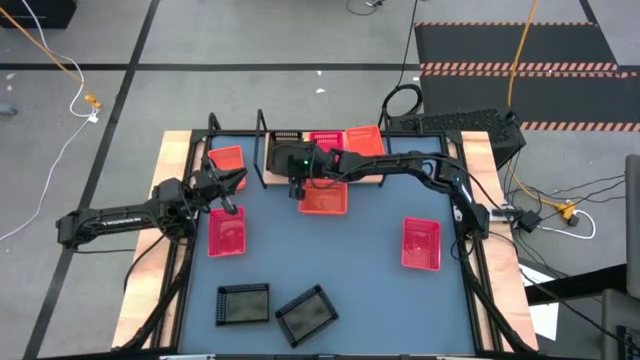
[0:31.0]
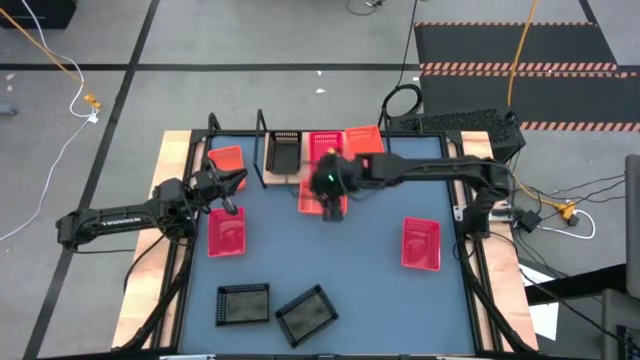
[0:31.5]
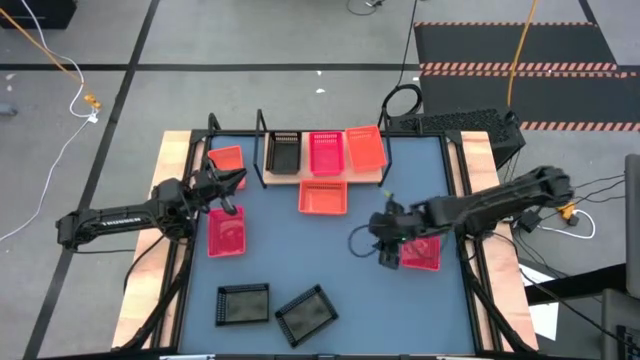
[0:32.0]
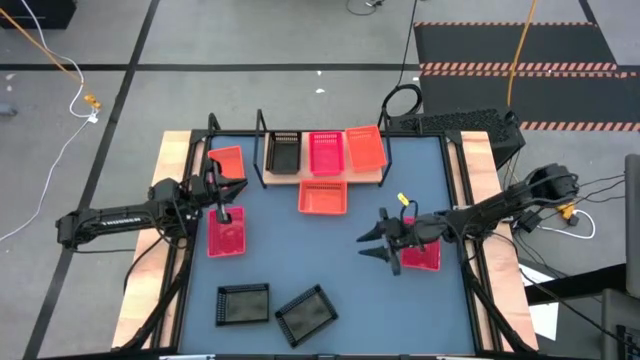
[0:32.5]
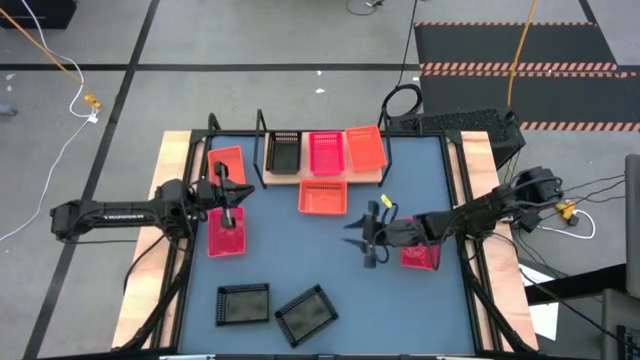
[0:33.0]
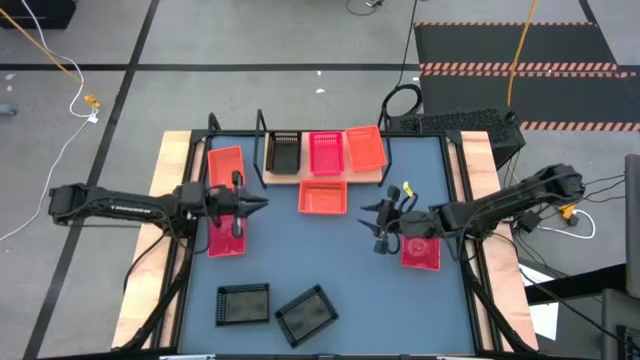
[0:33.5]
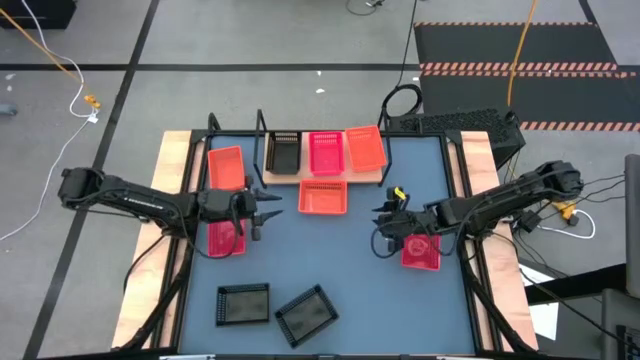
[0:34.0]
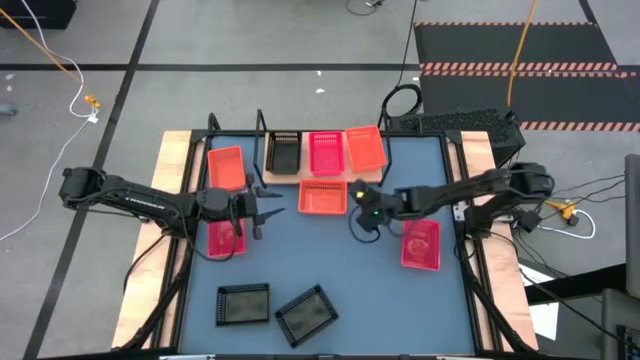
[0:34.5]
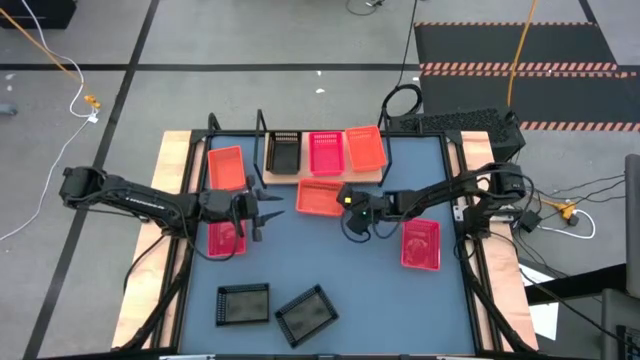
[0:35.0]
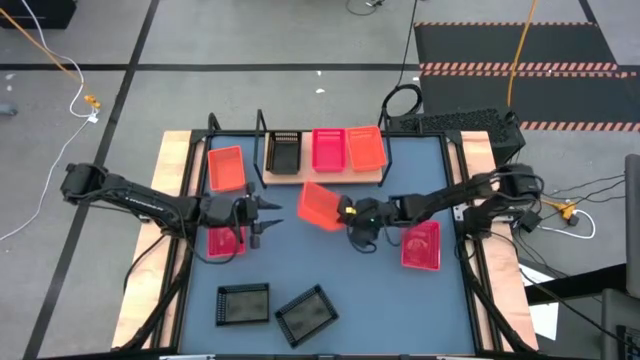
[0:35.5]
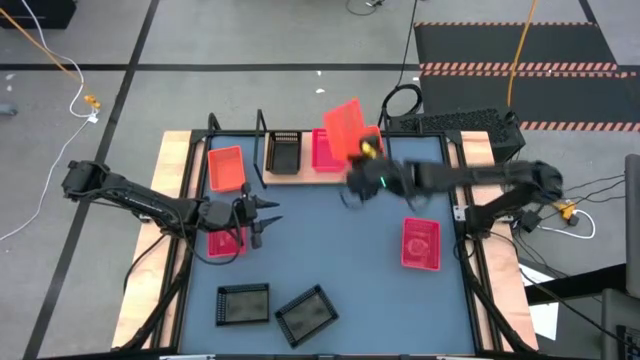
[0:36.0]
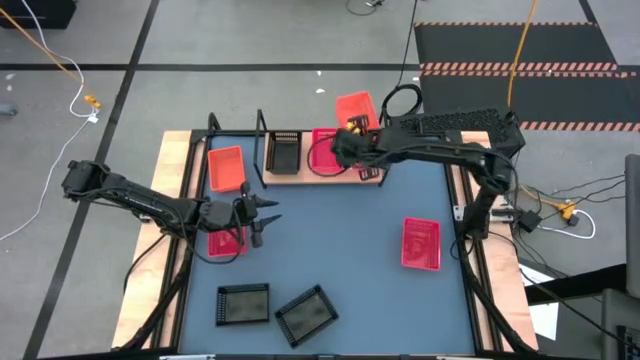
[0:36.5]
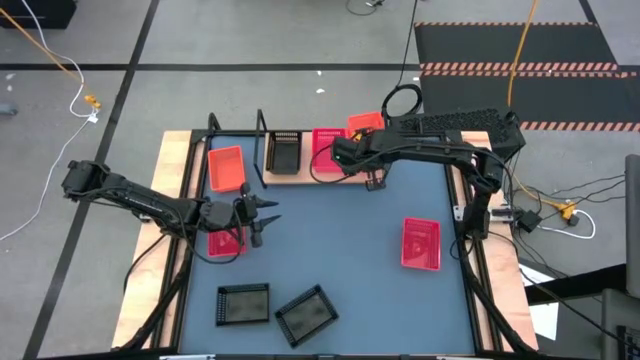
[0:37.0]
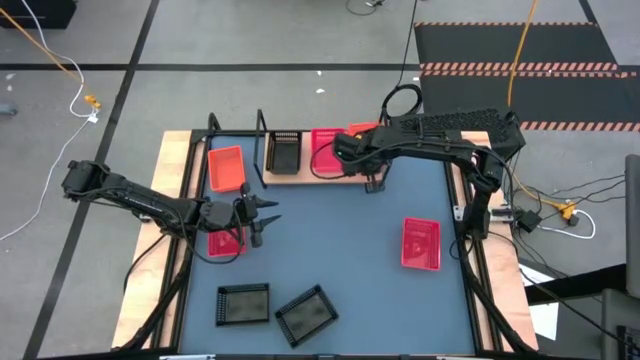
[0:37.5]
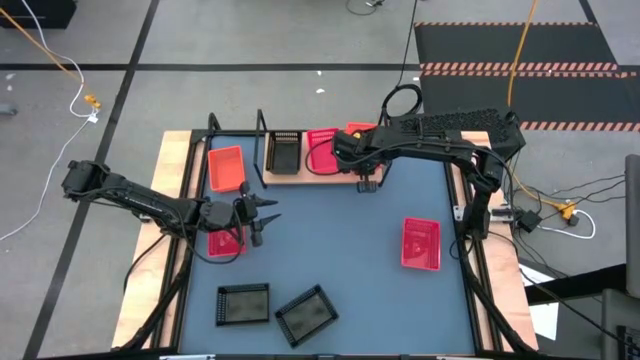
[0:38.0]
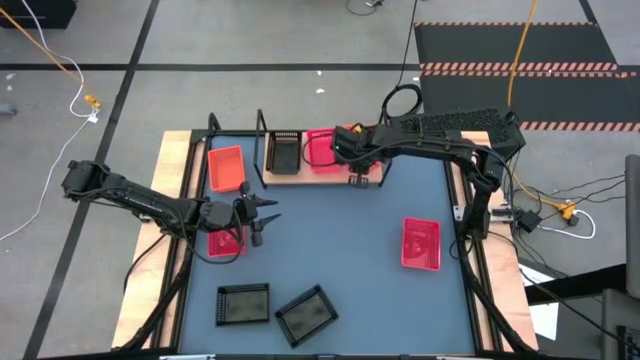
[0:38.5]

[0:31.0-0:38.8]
Task: Stack baskets on shelf by color
Stack the right orange bin on the orange bin on the shelf

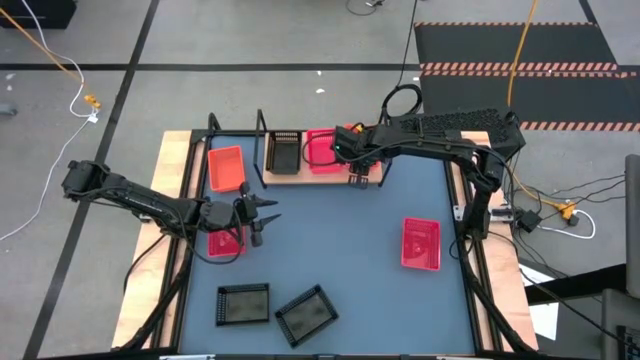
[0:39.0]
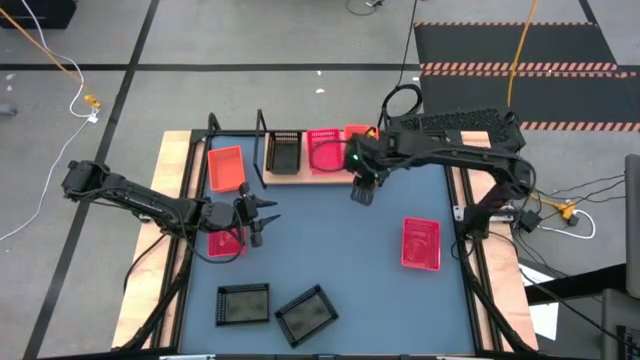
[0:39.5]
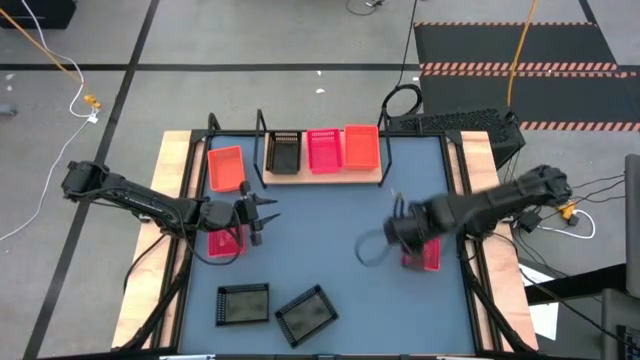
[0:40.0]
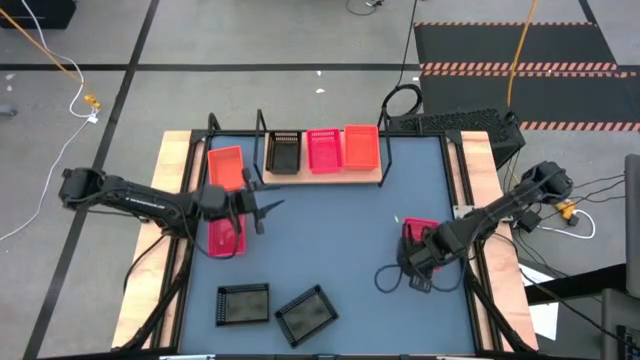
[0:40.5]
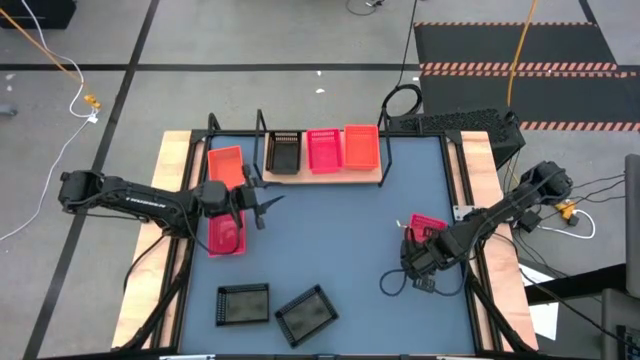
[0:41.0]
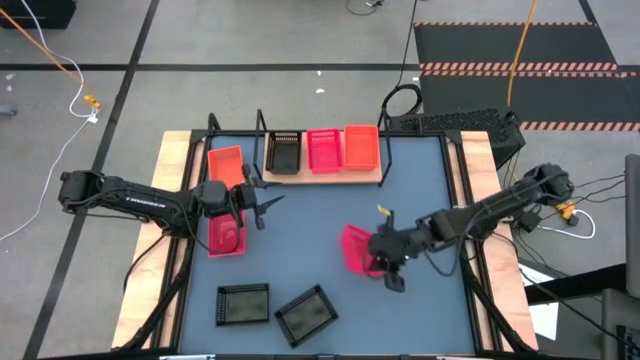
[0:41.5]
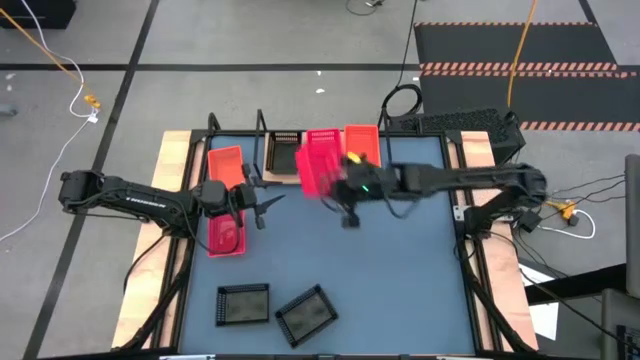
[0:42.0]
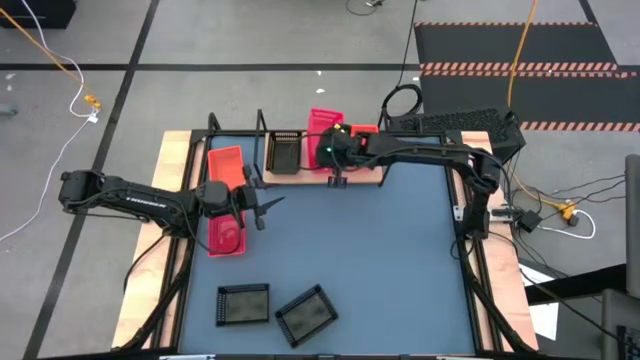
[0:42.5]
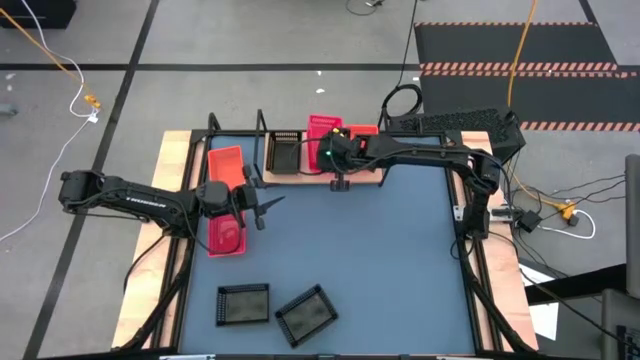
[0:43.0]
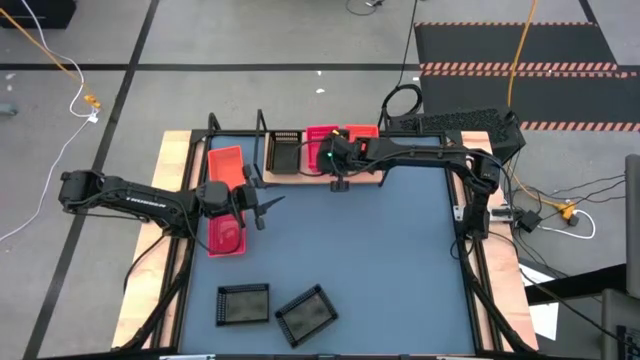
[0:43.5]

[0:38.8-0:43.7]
Stack the right red bin on the red bin on the shelf

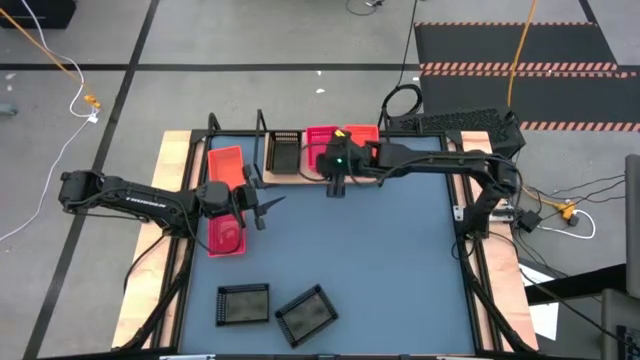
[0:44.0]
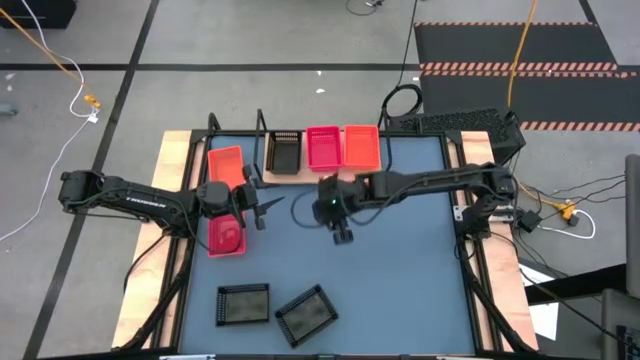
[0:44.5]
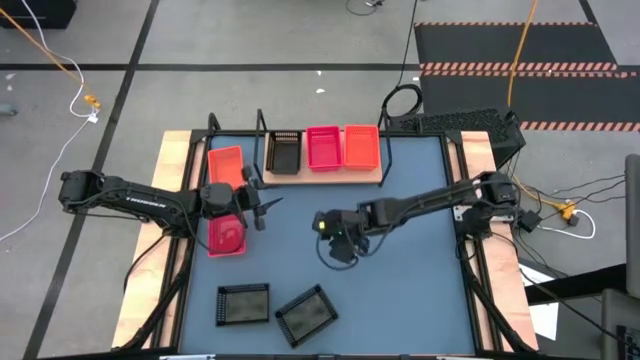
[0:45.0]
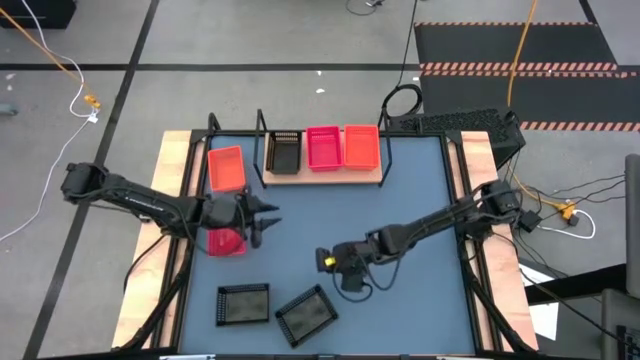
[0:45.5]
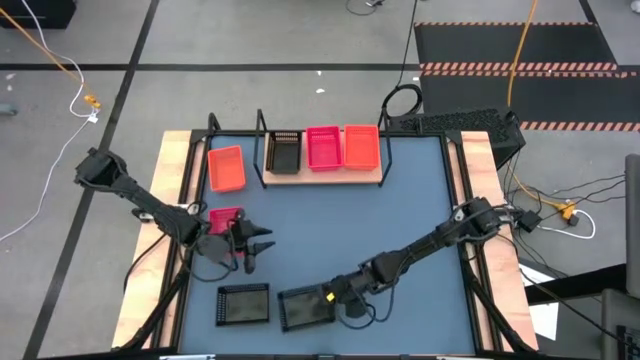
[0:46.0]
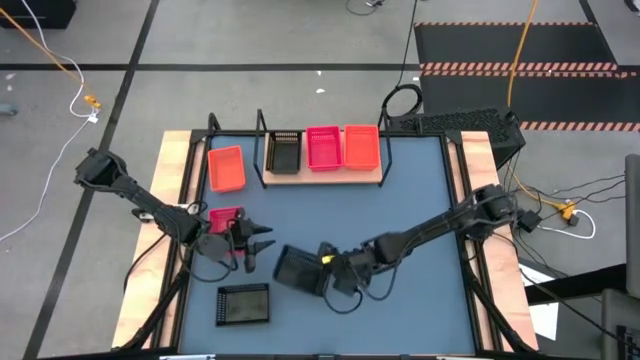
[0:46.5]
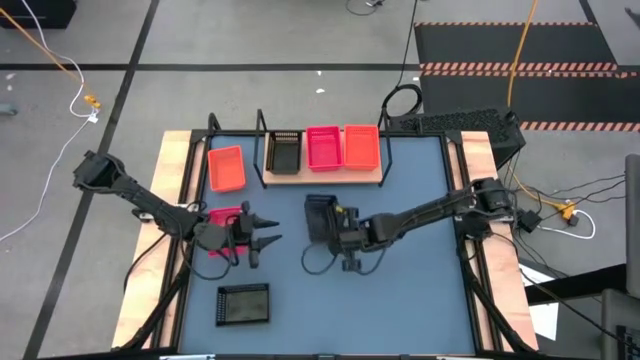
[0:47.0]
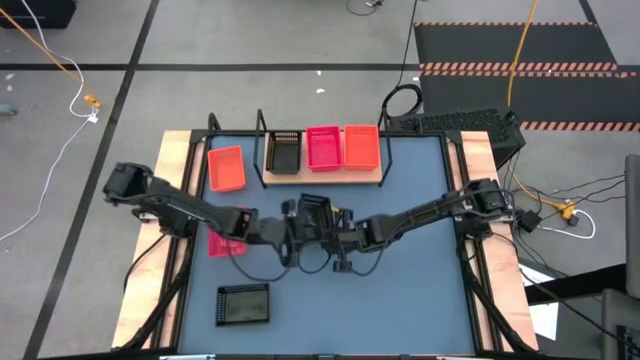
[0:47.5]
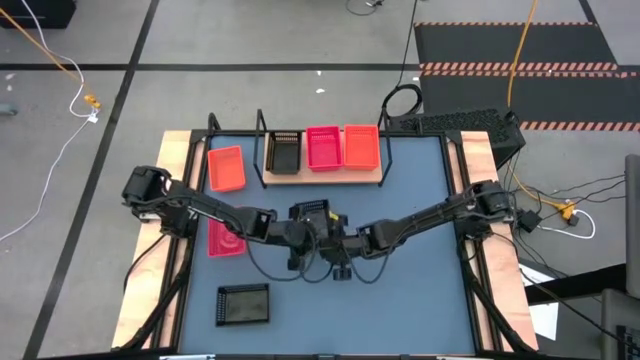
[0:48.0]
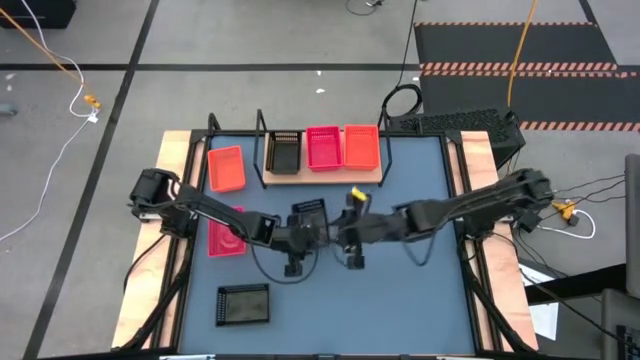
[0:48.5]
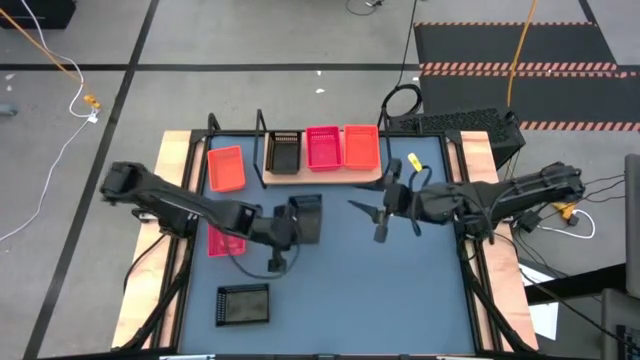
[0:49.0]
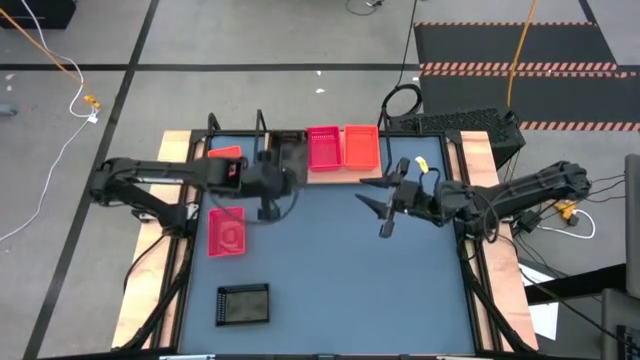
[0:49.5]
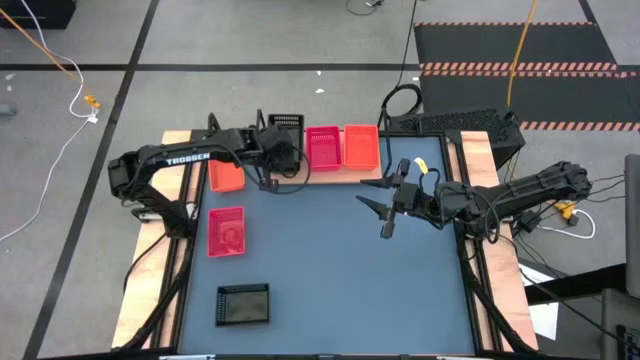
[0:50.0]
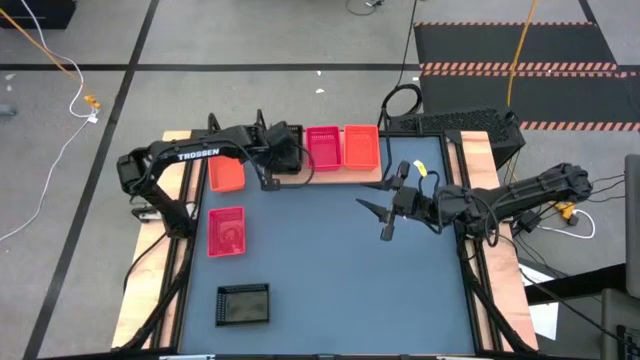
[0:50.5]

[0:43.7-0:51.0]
Stack the right black bin on the black bin on the shelf
